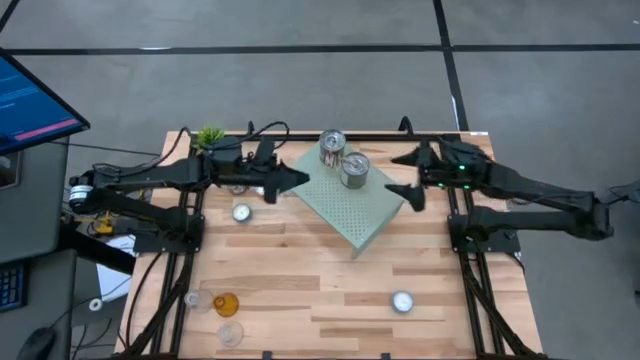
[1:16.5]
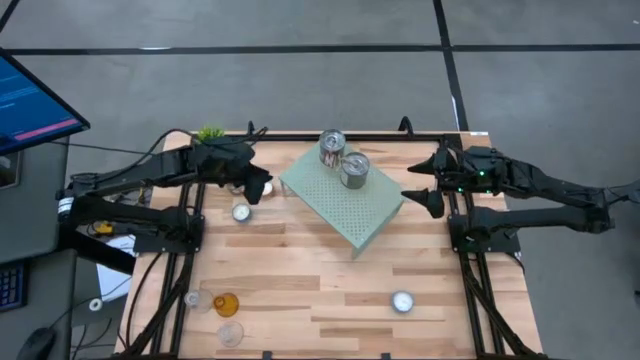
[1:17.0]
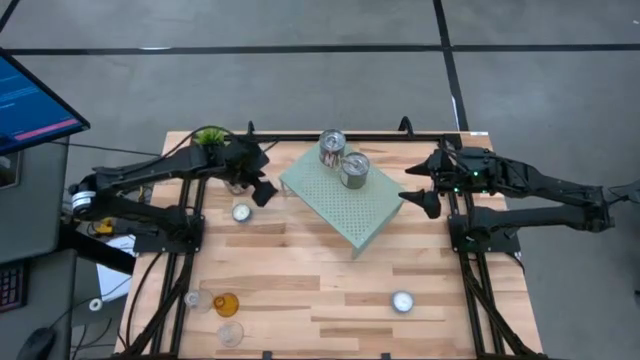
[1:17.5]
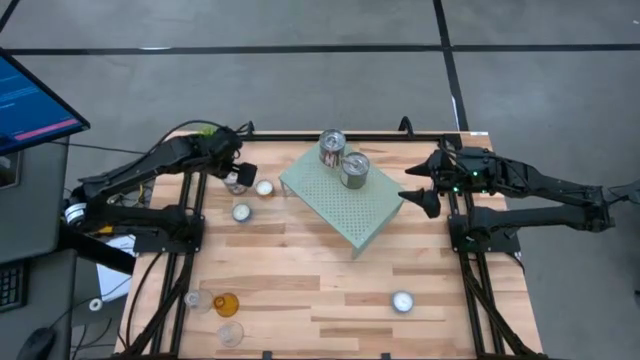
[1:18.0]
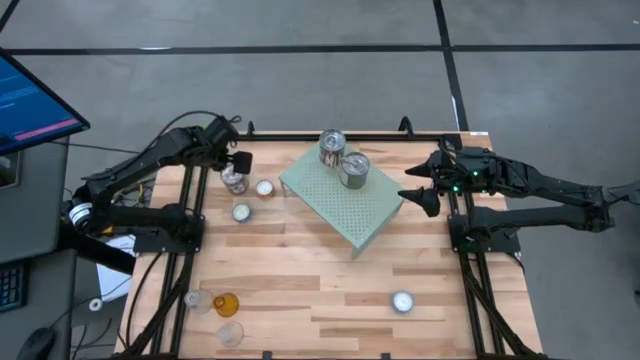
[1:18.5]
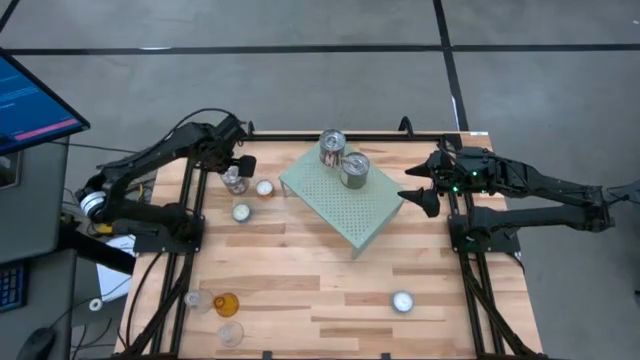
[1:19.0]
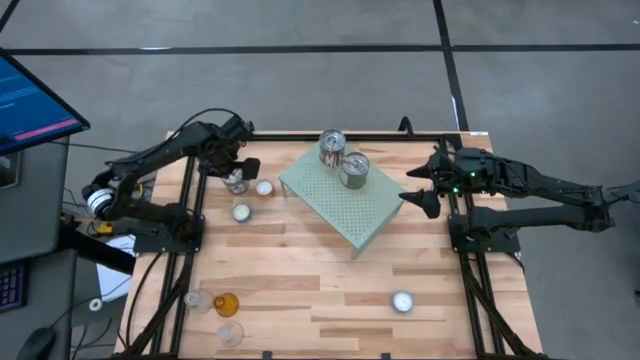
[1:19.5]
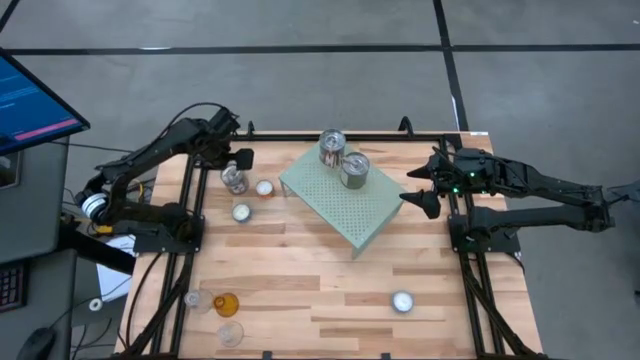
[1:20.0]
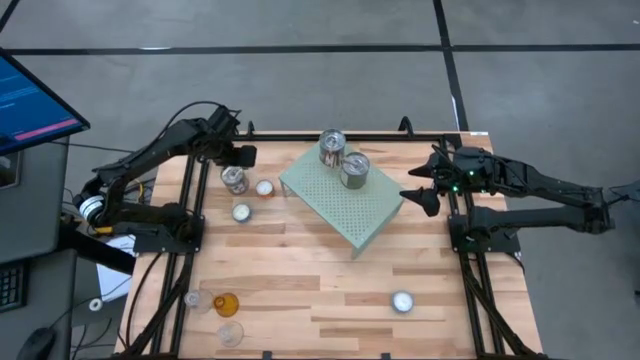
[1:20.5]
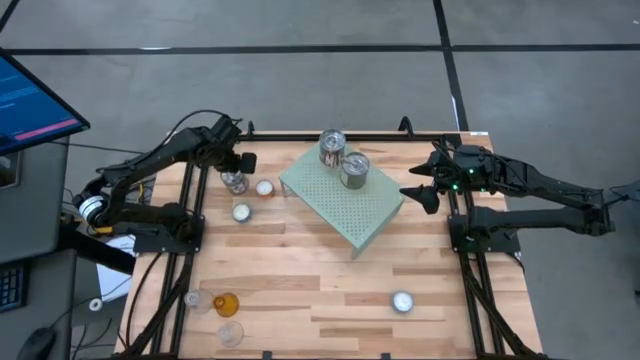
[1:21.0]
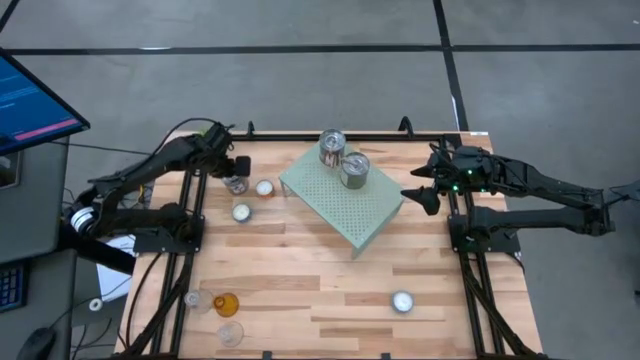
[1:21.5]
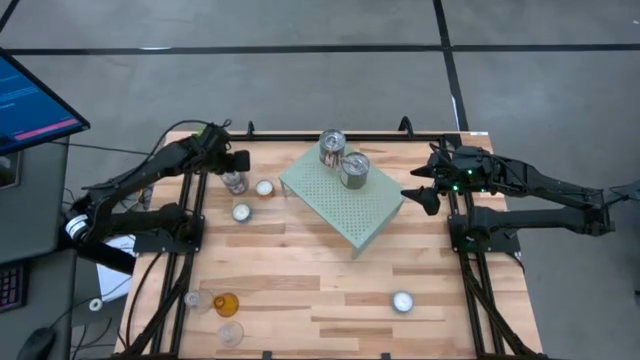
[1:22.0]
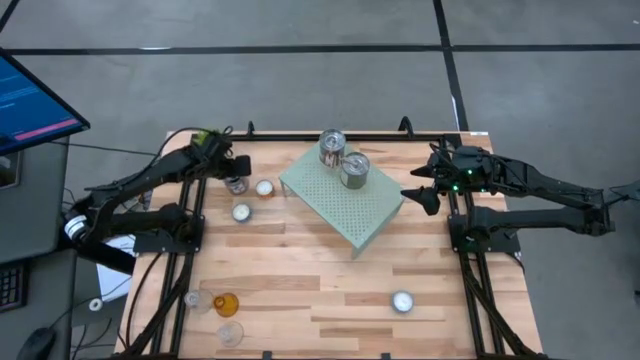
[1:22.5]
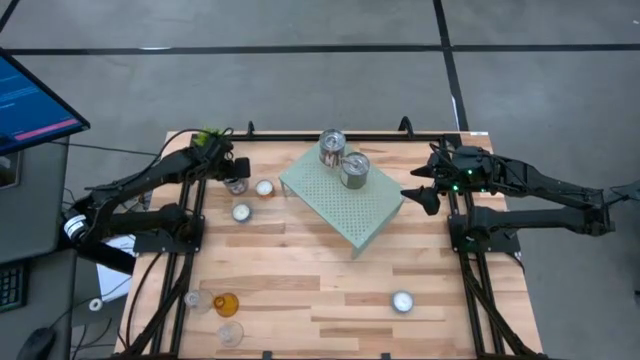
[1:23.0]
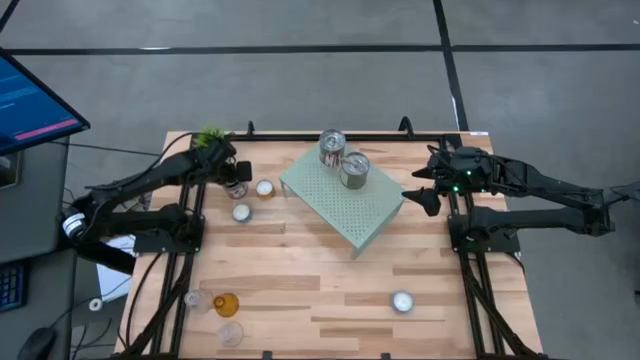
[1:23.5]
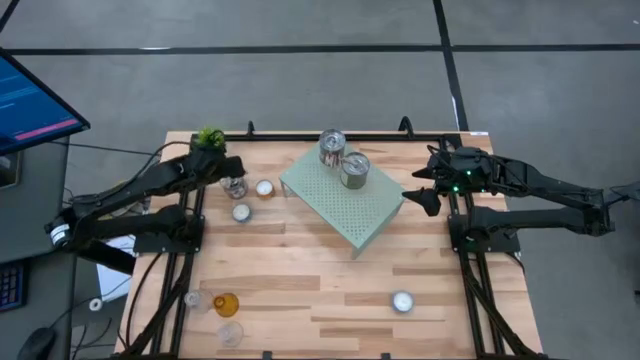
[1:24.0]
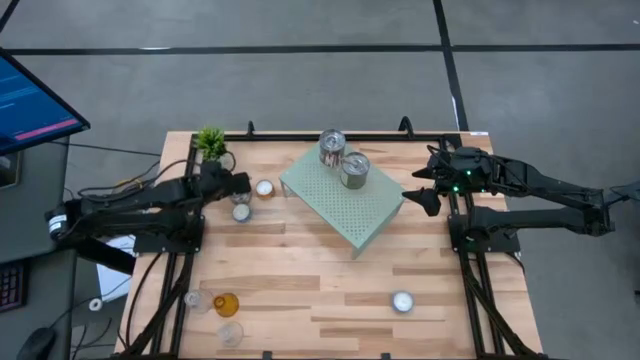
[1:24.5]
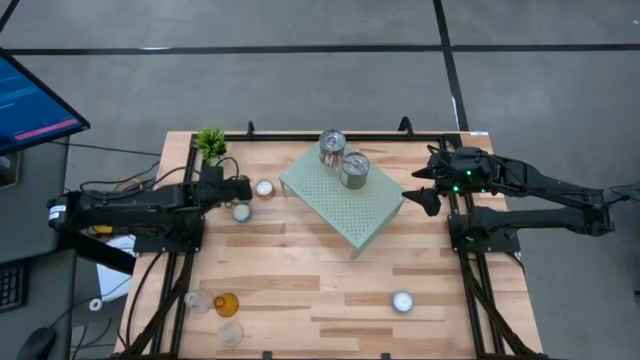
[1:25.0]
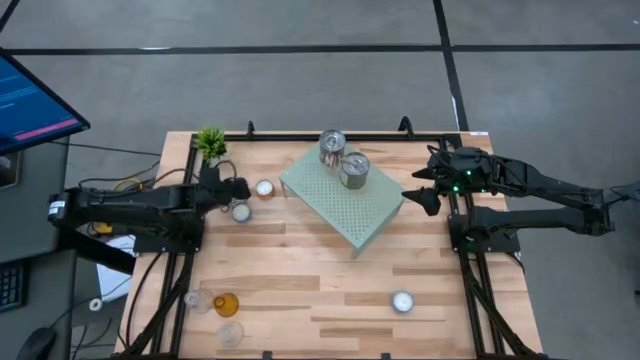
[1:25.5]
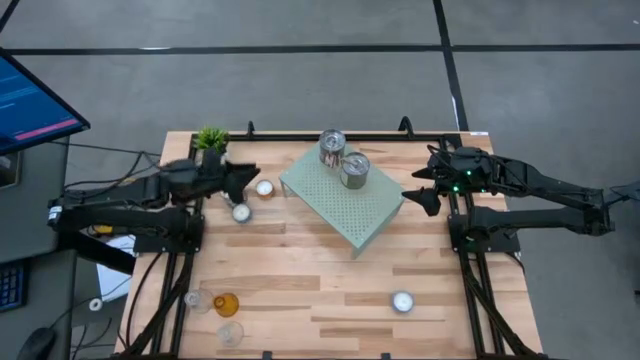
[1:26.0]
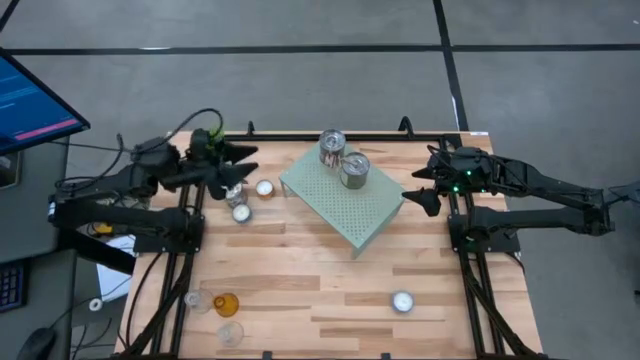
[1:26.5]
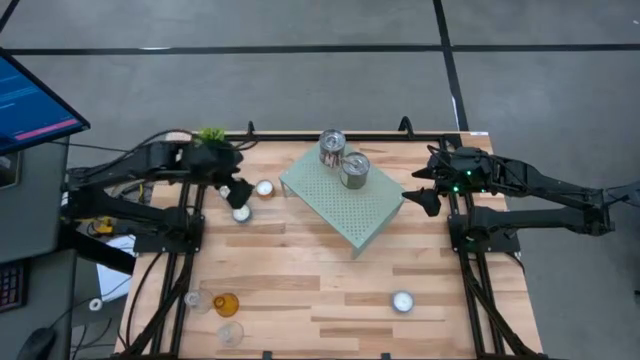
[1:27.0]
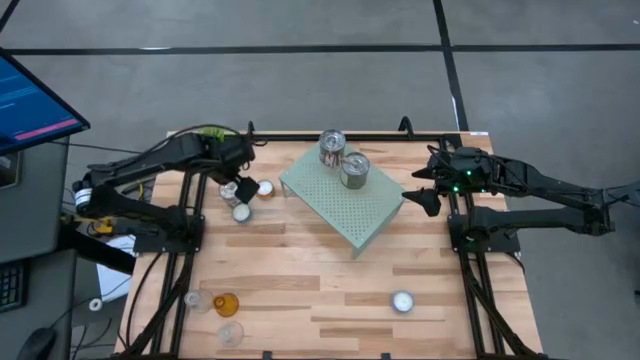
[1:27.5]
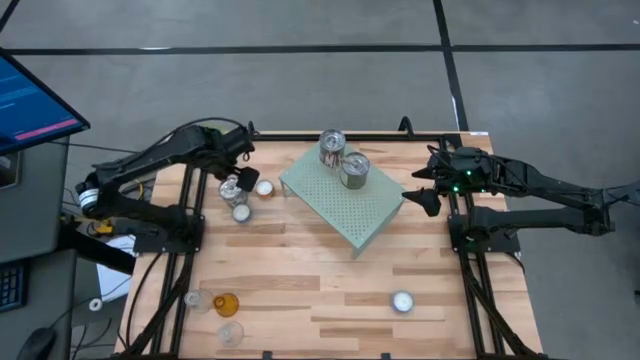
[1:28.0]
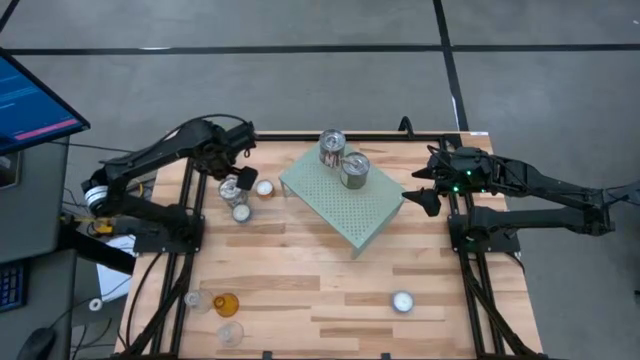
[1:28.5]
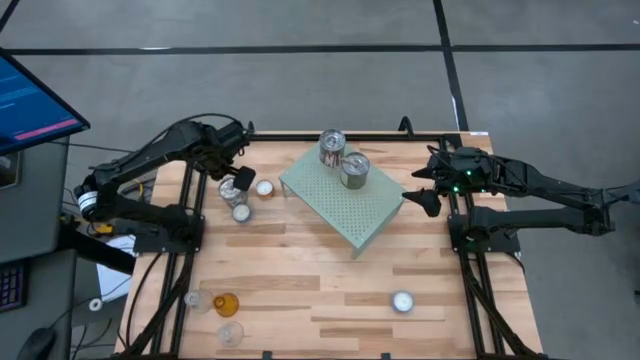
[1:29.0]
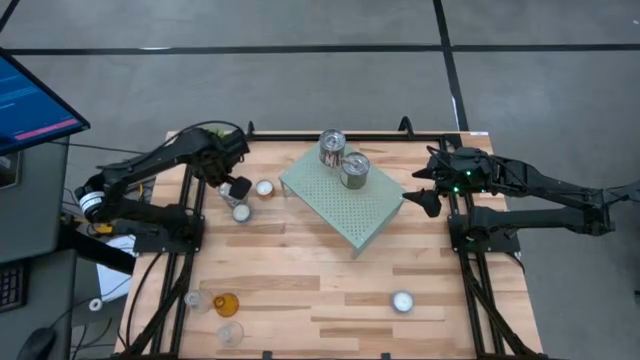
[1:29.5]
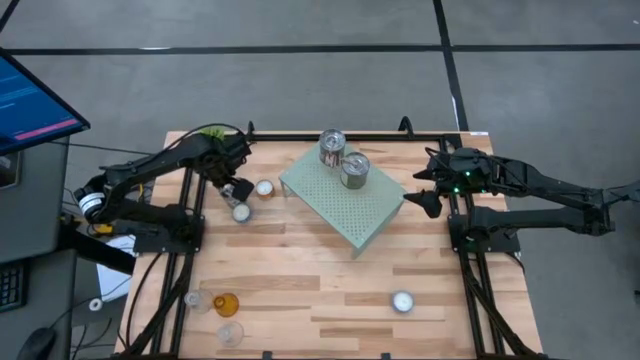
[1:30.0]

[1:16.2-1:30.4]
Task: Stock candles on shelf
Put the silver scented candle on the shelf

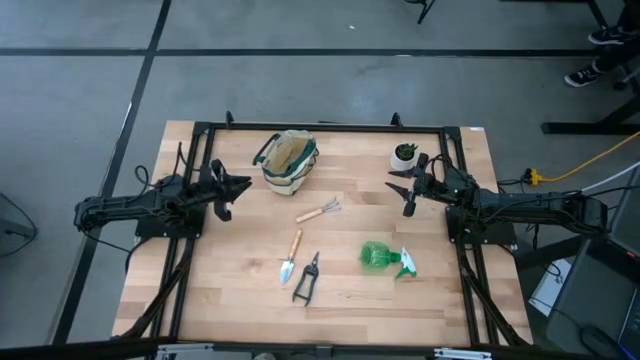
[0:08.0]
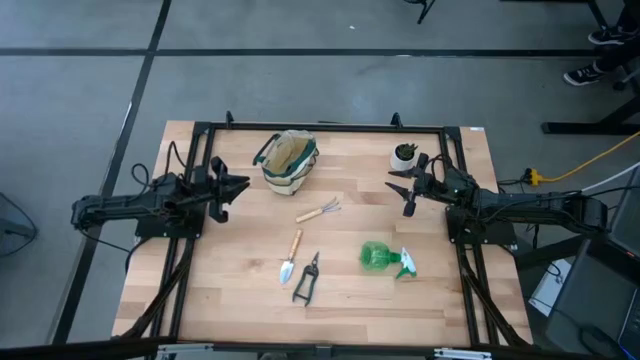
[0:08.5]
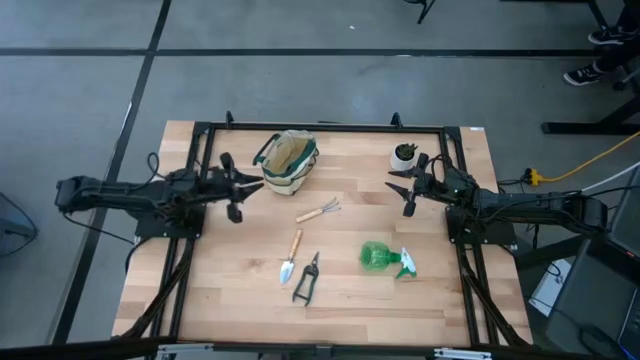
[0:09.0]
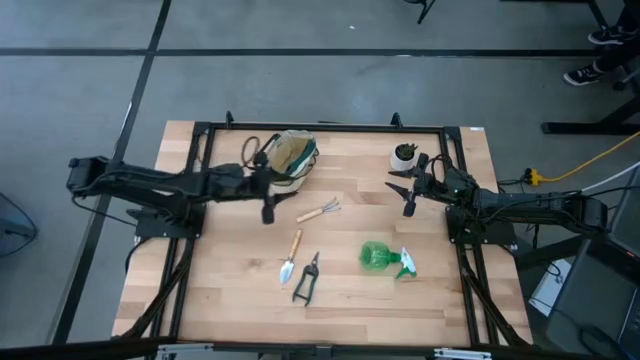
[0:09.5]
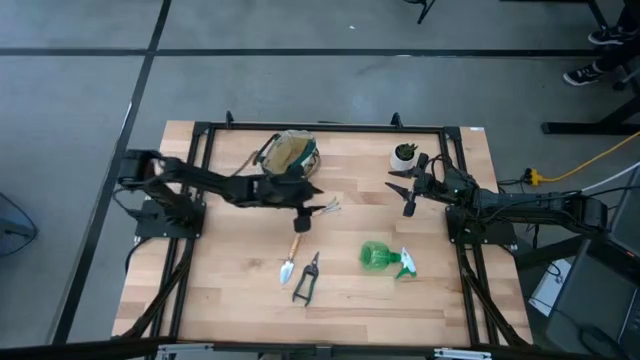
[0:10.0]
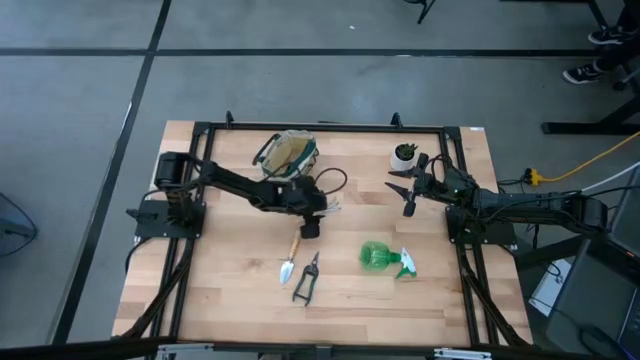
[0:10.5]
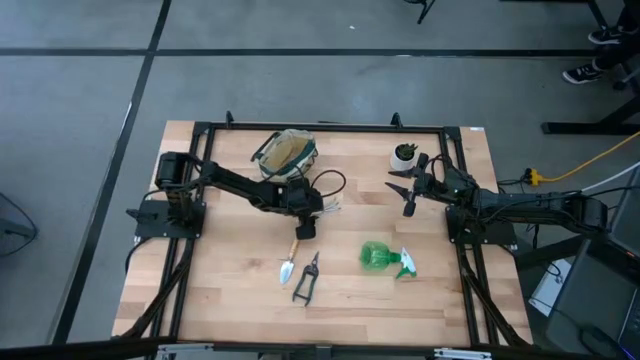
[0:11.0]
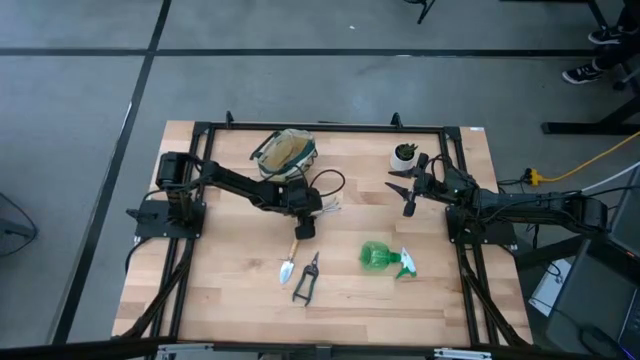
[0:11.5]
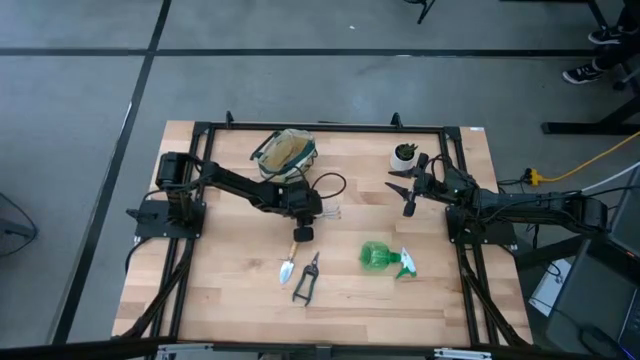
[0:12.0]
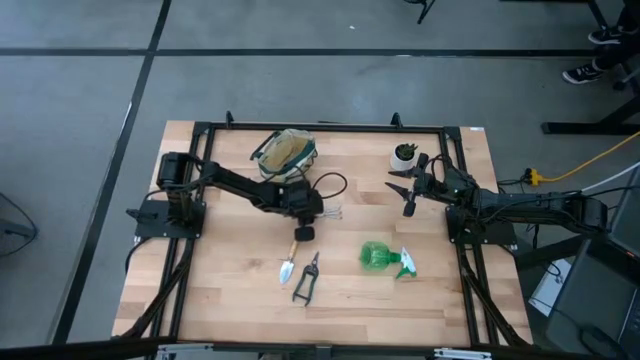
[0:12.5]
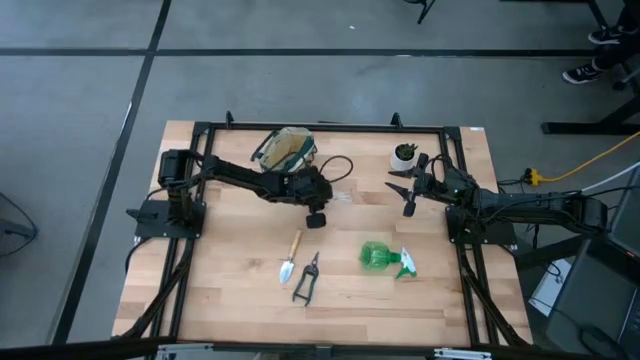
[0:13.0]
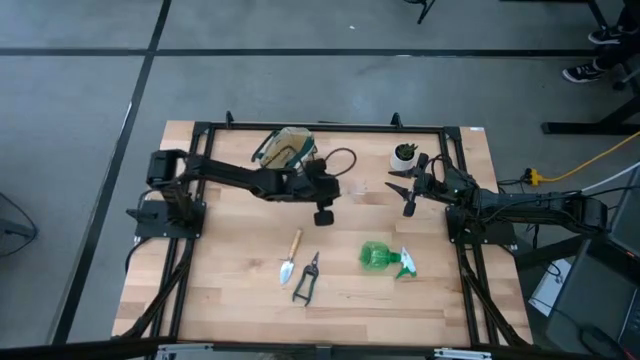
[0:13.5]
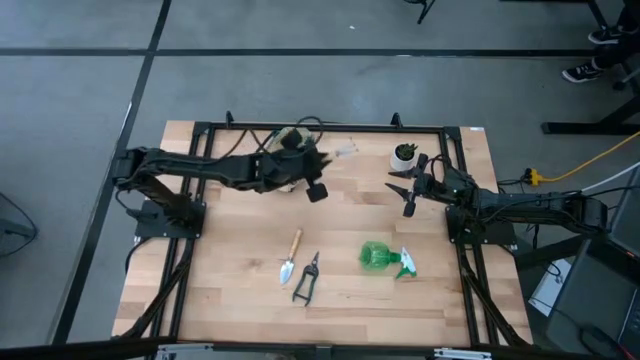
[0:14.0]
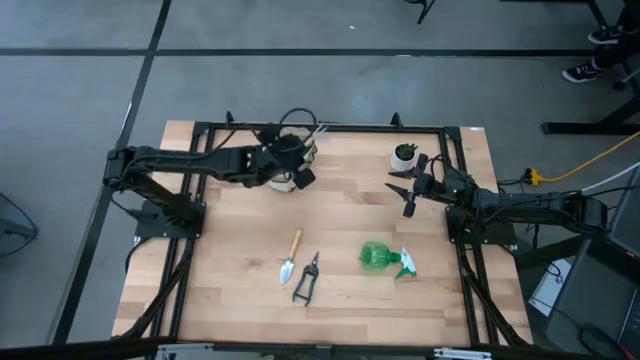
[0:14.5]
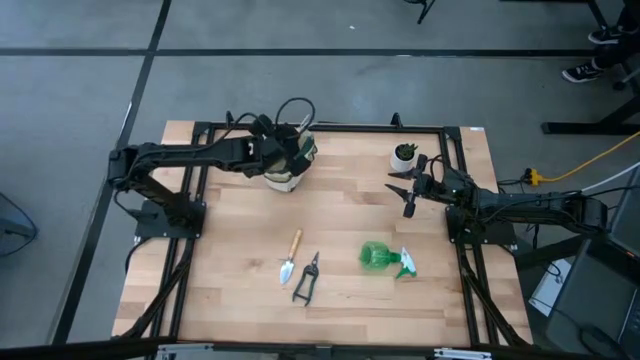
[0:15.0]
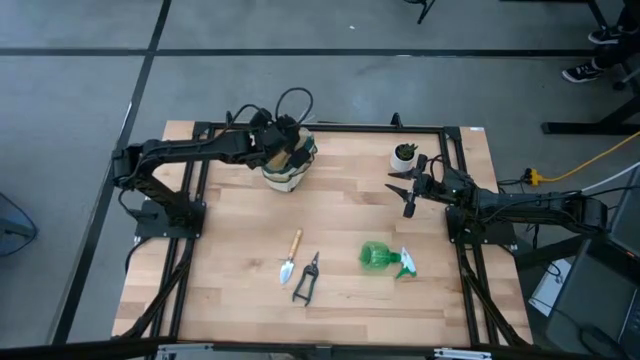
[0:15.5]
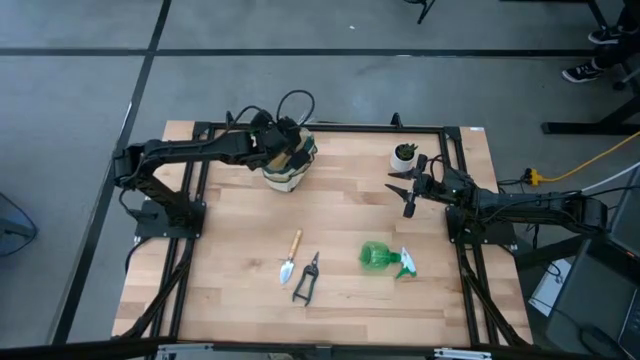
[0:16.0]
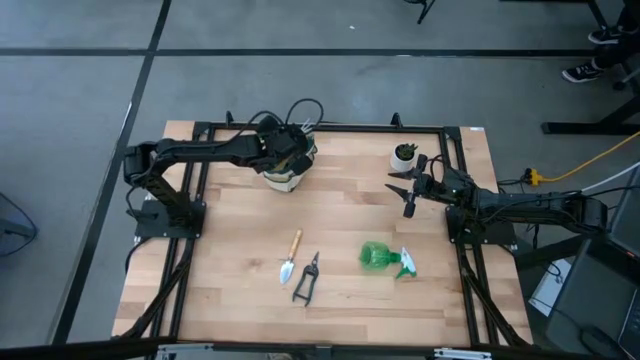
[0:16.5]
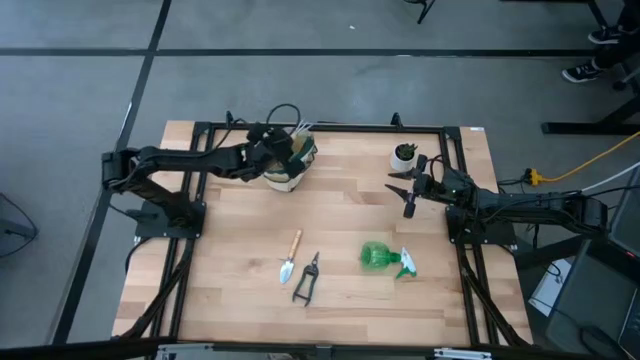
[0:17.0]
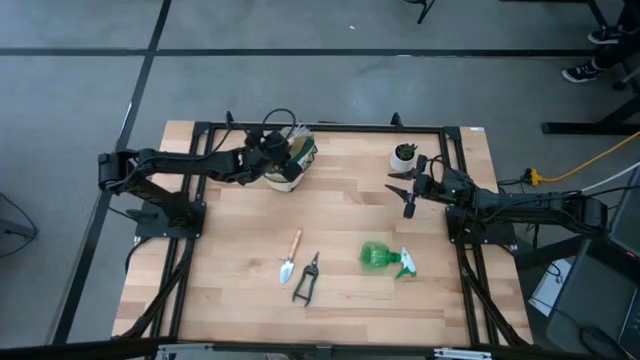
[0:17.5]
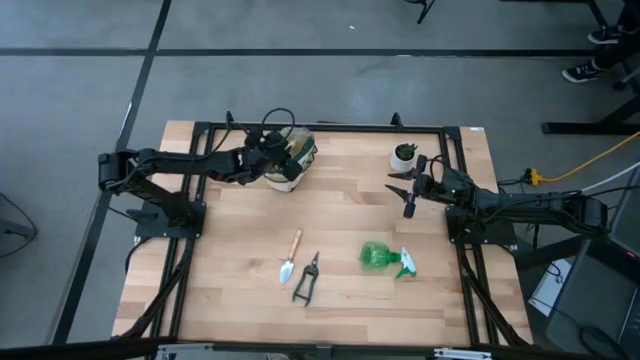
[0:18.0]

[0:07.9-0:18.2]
Task: Pick & Place Garden tools in Gardening bag
Put the hand rake into the gardening bag
